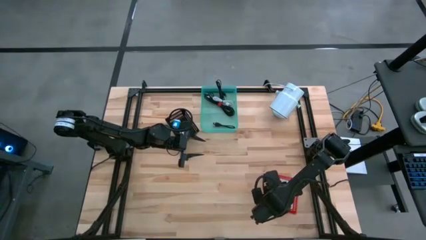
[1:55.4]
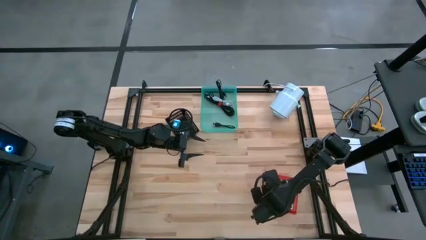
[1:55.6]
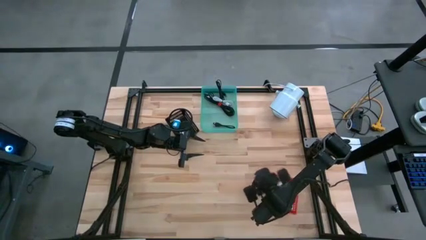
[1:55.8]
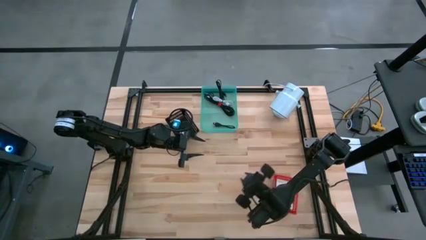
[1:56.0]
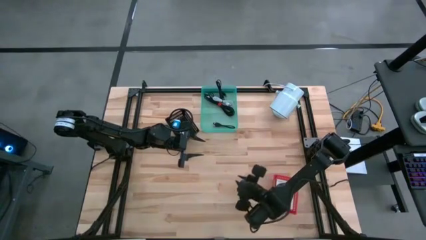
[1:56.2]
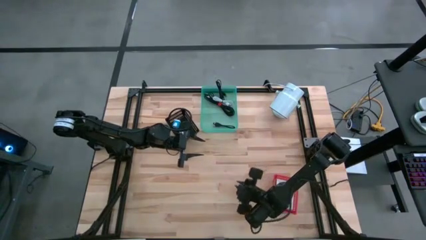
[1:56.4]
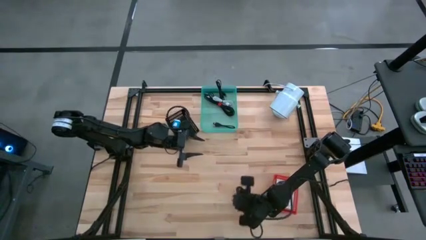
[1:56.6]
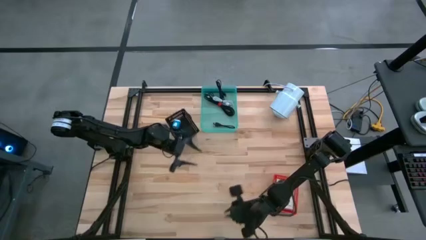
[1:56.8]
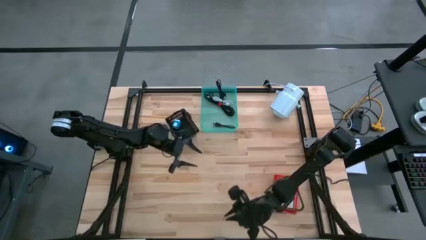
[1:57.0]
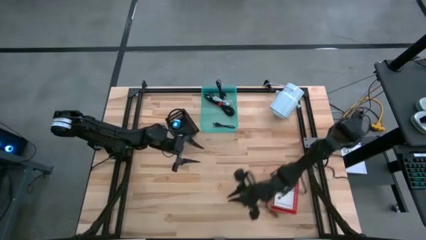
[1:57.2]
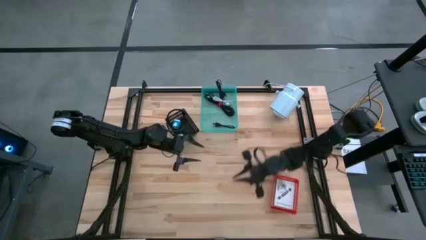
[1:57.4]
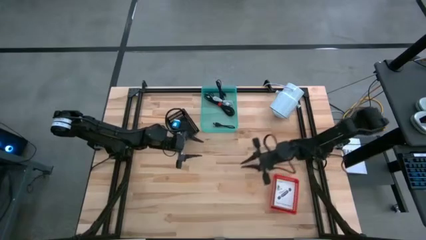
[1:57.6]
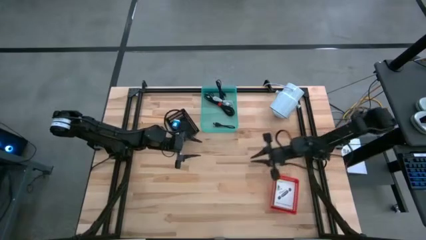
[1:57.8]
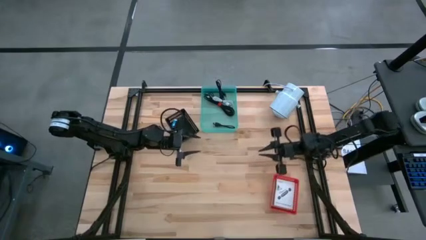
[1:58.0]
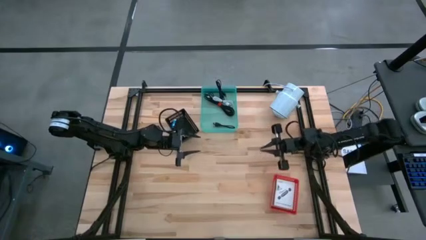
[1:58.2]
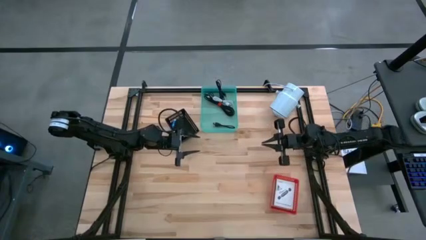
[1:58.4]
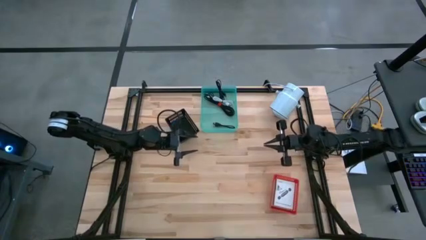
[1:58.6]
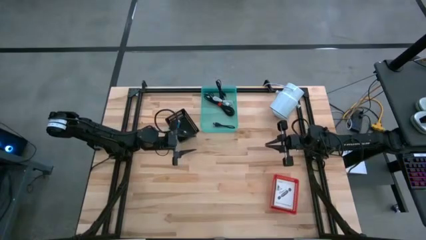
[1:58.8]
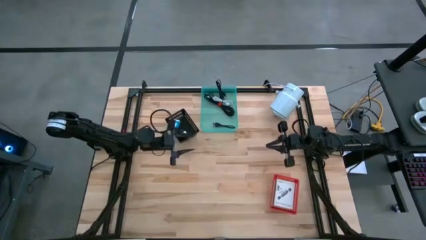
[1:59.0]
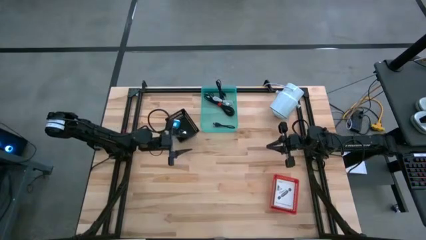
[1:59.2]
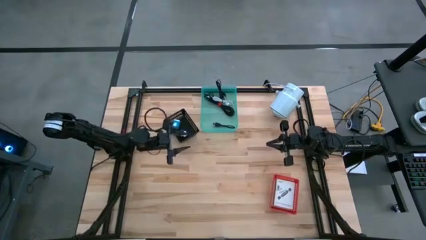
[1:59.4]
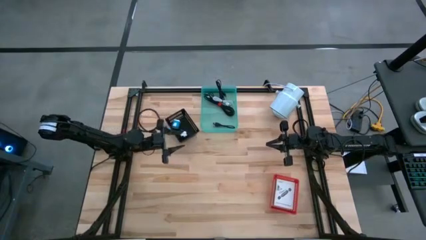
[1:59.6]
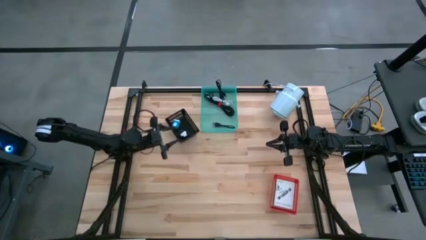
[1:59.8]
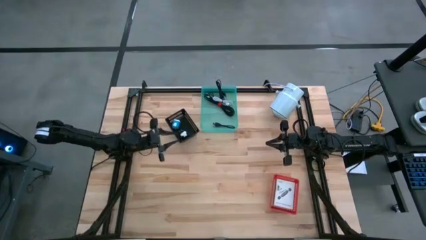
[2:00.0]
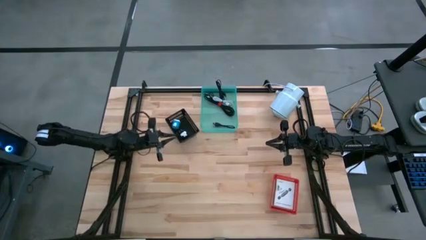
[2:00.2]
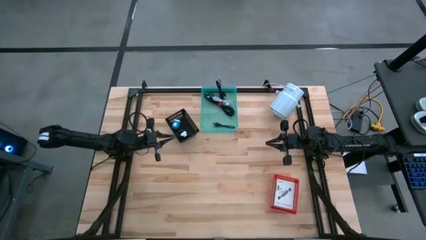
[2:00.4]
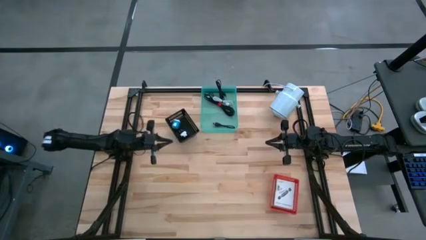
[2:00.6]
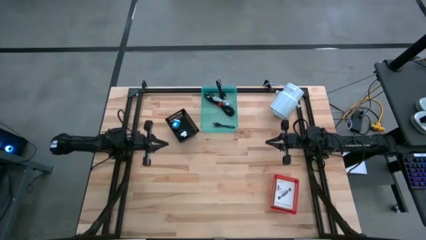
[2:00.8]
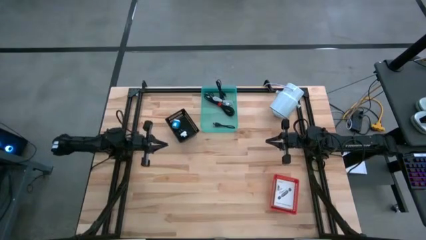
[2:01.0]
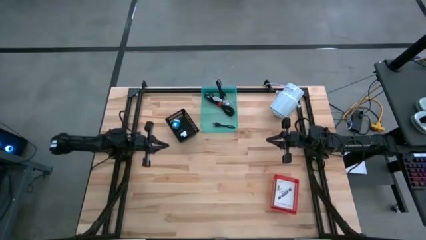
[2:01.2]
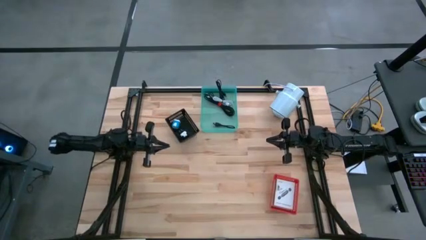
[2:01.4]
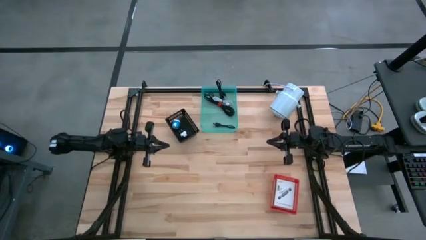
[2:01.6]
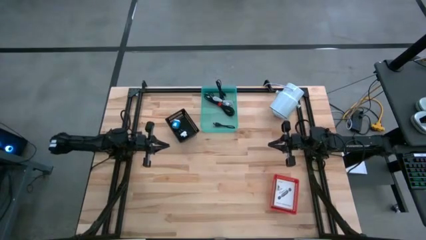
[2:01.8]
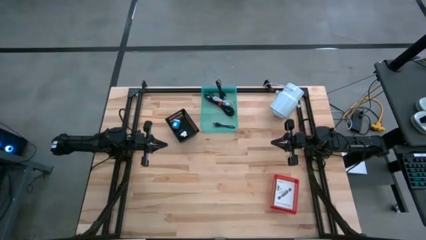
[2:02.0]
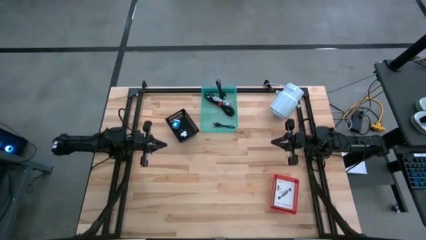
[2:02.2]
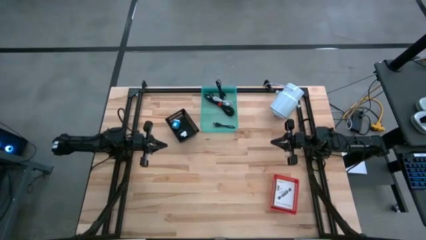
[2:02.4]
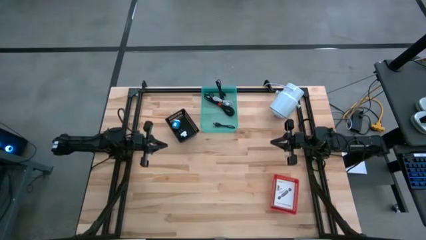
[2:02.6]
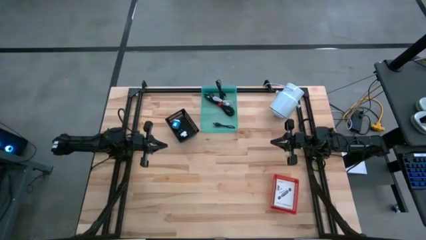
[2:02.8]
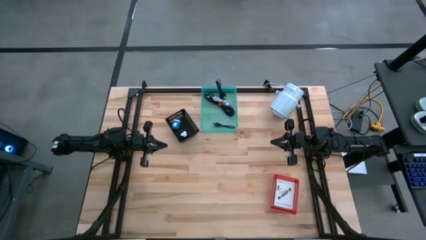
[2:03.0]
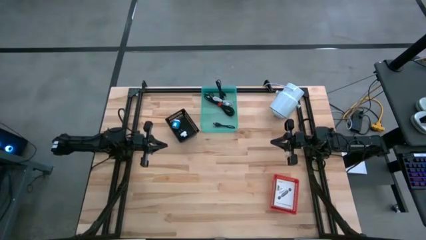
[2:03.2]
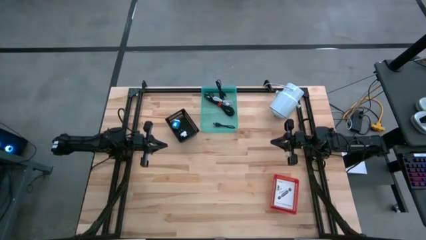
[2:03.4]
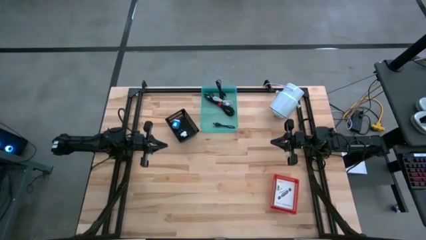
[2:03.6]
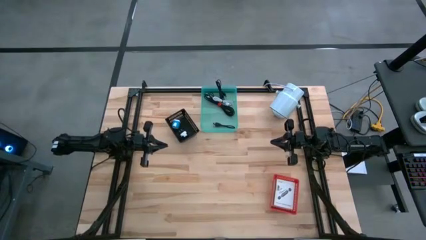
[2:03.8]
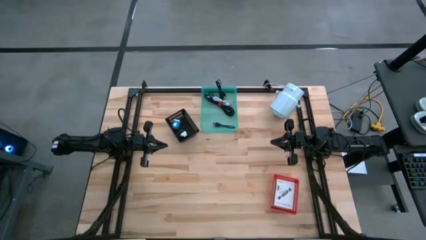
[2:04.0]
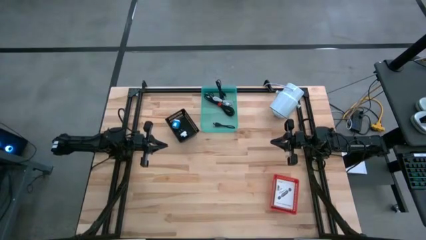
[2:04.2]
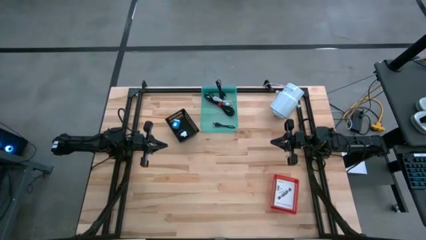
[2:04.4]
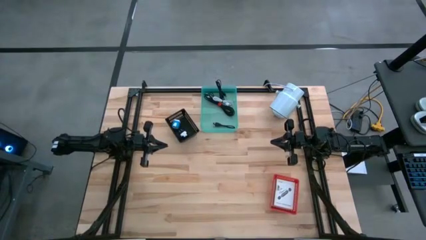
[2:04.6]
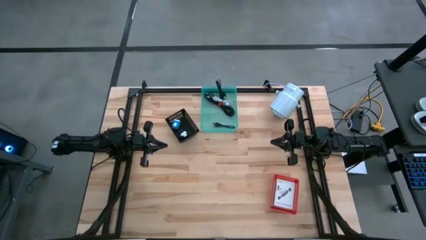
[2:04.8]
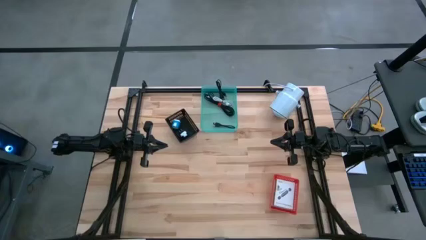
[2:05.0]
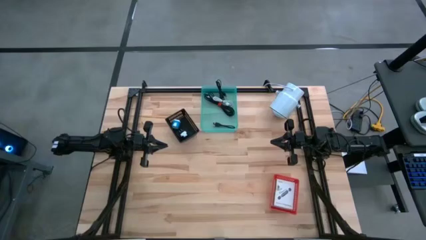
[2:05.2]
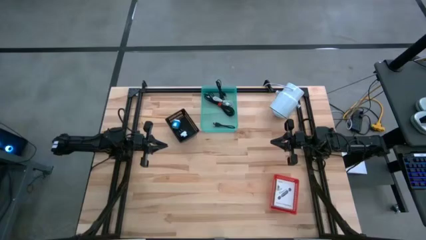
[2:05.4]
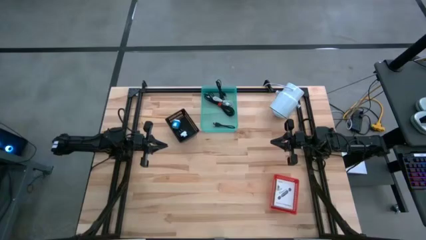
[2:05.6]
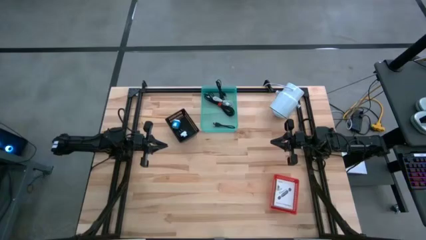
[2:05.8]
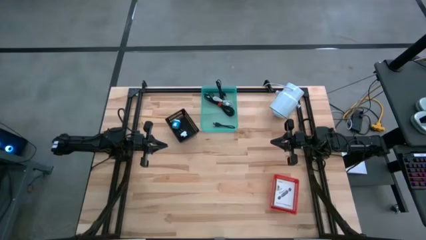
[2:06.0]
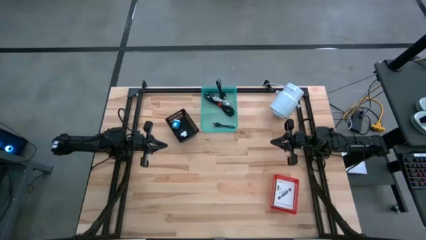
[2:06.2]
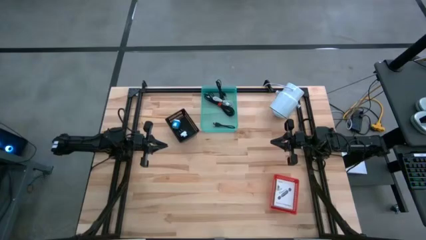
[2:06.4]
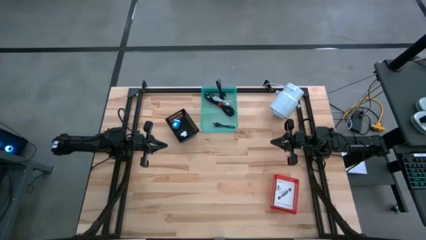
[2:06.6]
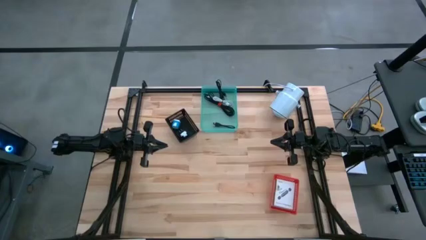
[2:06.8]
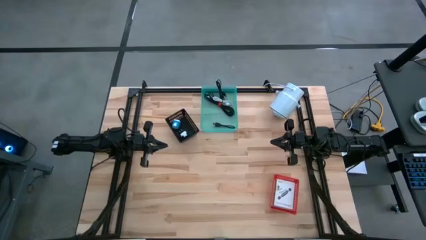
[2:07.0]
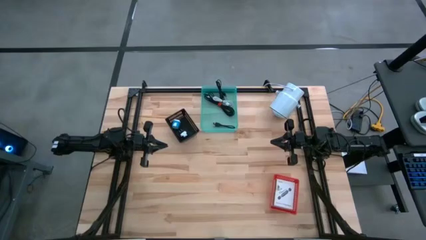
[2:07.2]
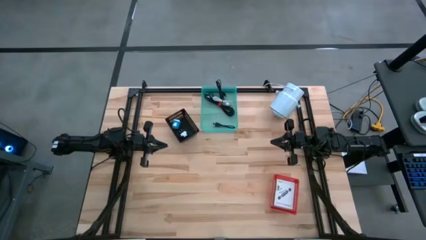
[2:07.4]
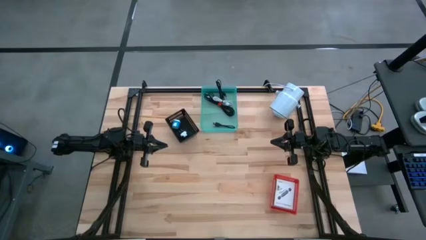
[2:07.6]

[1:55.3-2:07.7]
Task: Pick and place items into bin
Return to Home Position

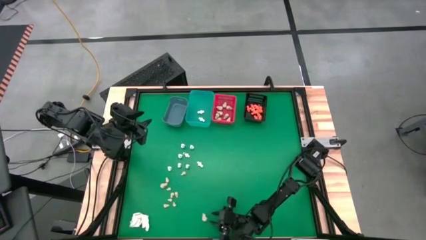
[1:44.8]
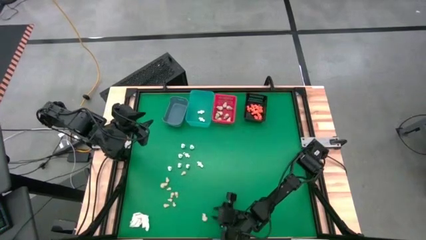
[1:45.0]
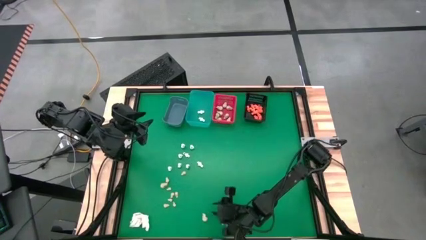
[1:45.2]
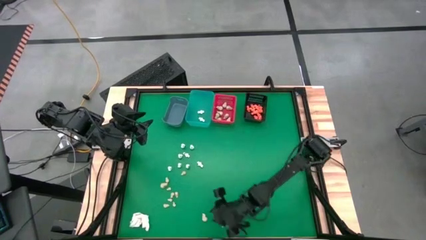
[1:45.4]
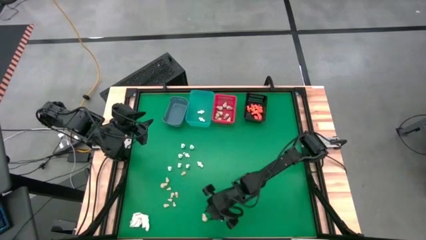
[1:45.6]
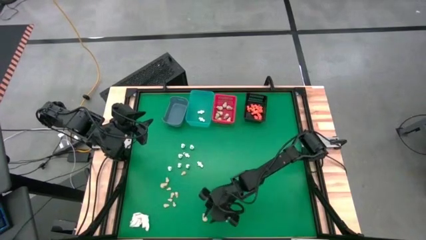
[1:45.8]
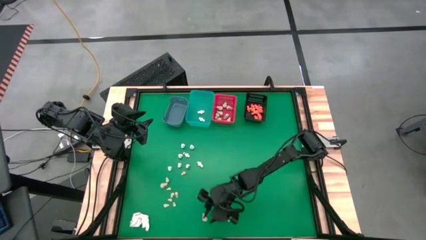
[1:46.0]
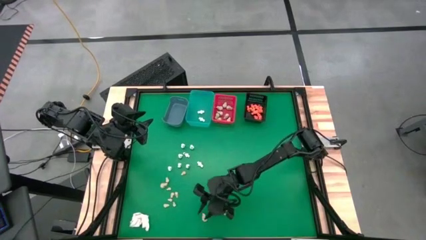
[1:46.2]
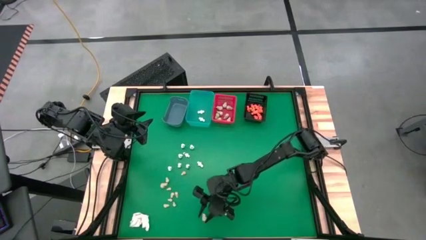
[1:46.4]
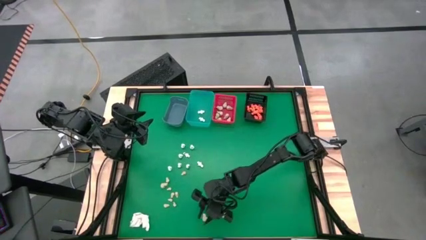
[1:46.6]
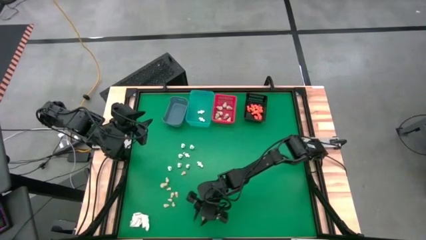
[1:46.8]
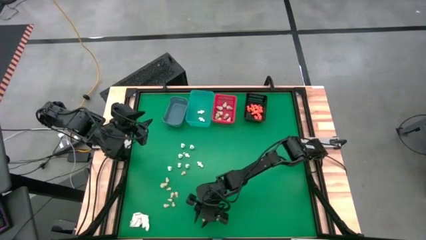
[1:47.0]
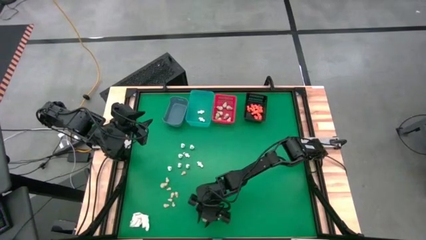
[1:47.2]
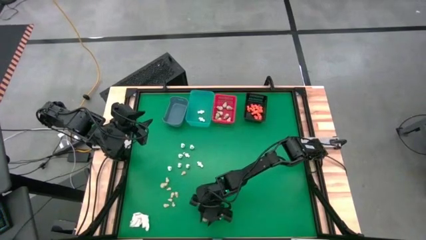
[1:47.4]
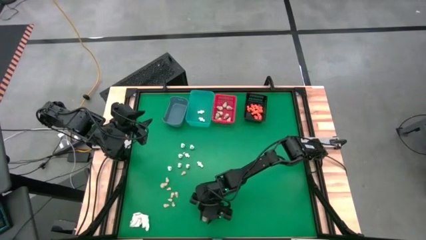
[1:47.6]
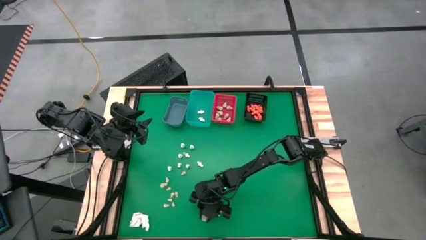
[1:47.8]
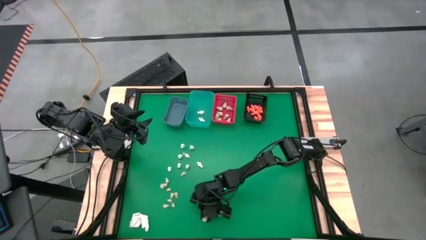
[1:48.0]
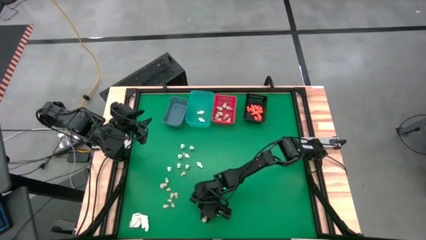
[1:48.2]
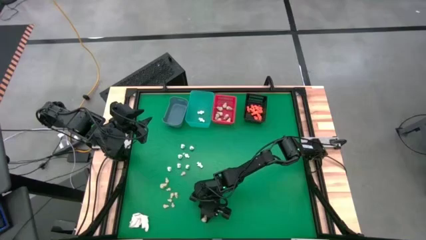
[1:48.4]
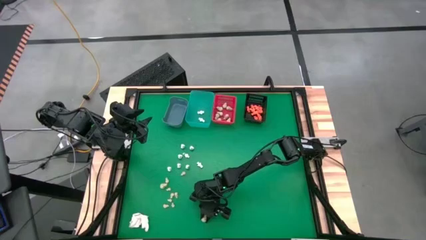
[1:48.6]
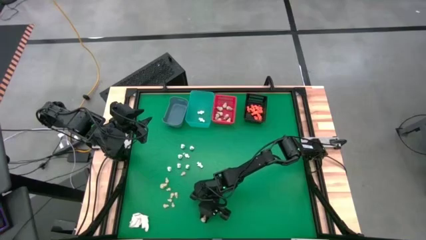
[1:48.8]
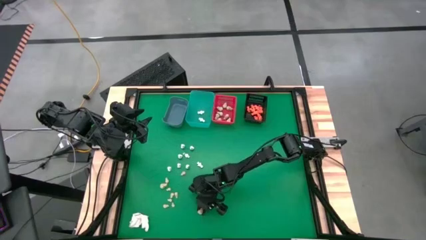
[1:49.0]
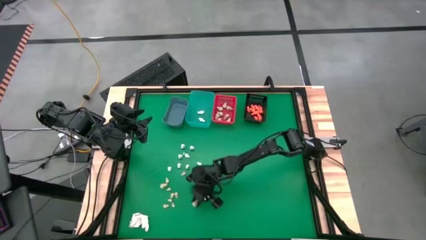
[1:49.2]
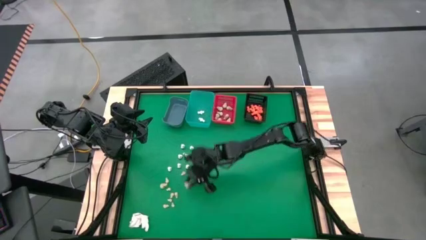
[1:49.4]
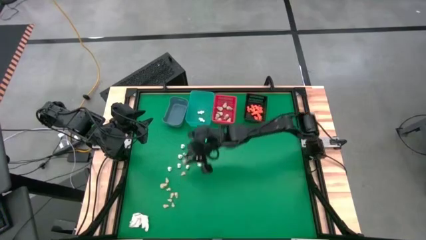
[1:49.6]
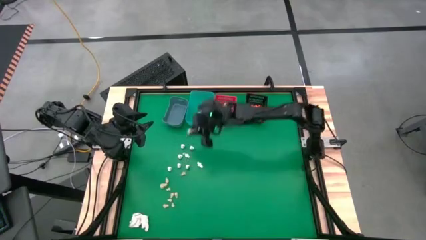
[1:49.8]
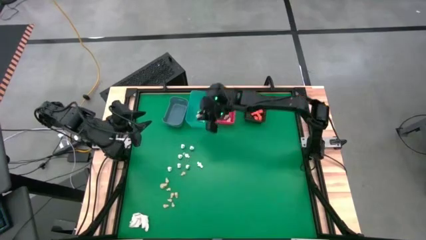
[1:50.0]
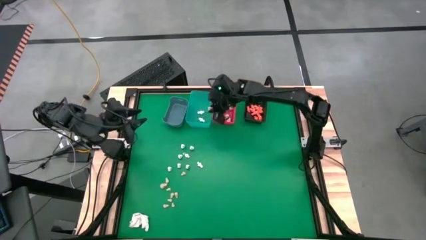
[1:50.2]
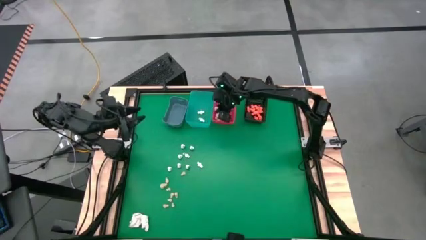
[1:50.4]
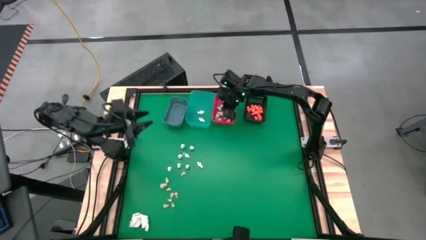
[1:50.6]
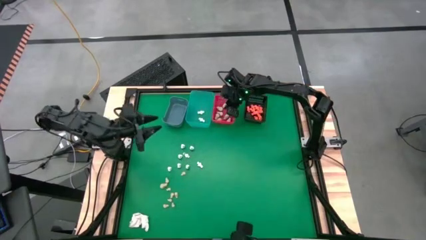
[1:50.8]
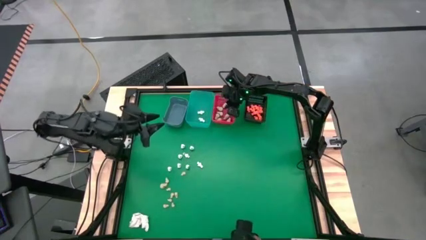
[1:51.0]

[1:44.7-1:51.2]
Task: Sort Halloween decoration
Put the white skull toy into the red bin
